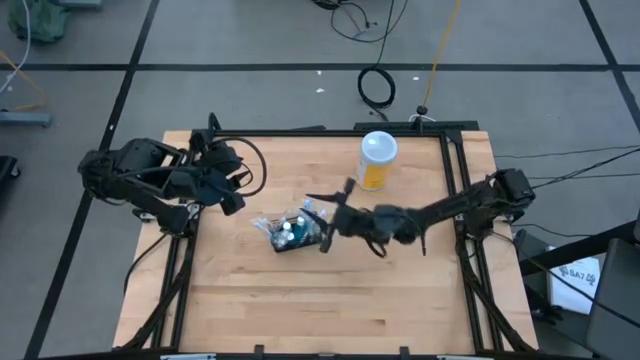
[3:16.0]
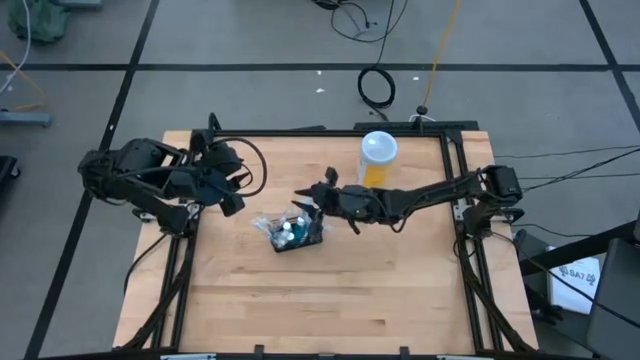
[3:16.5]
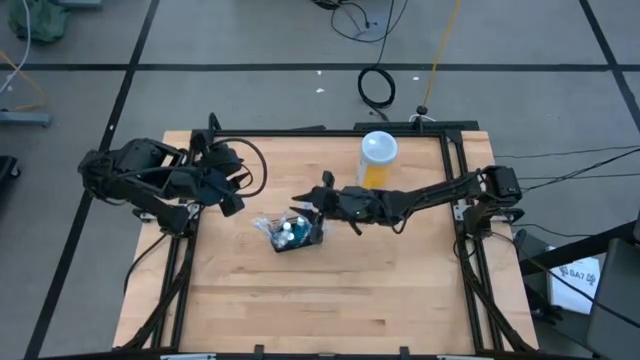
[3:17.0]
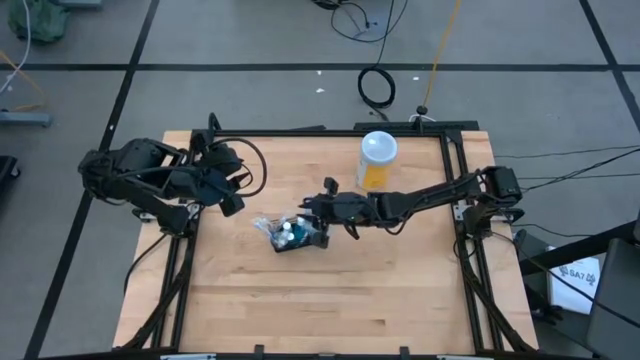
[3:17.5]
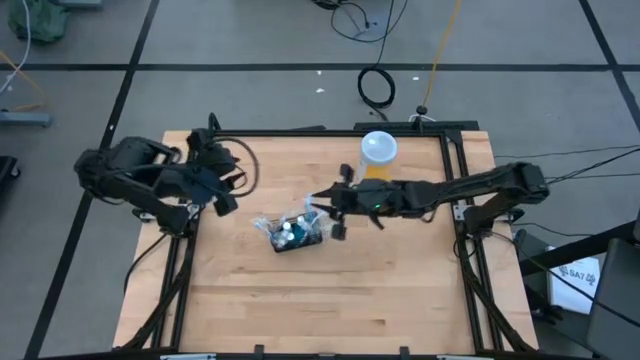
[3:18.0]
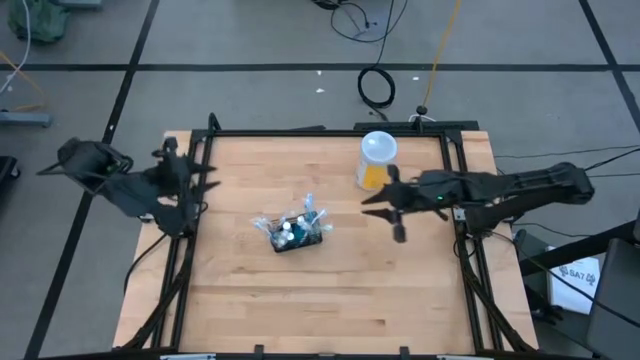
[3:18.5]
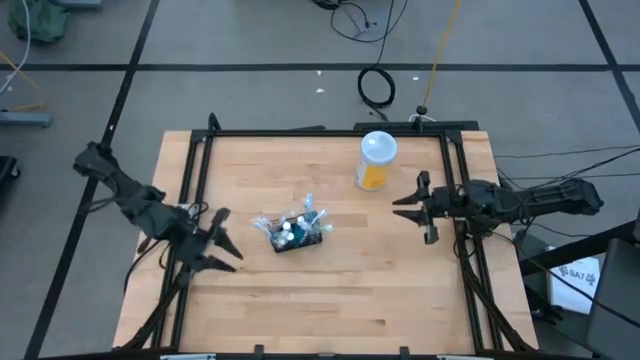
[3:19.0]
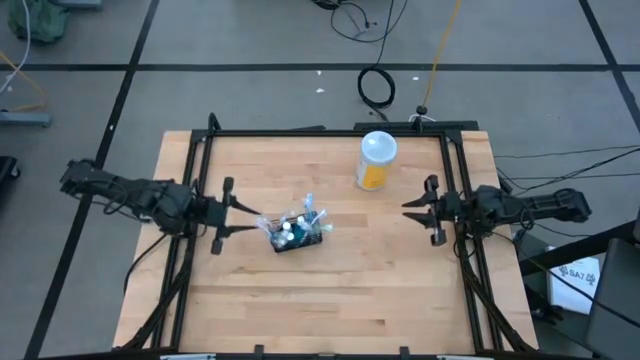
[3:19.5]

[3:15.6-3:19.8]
Task: Pick & Place toothbrushing station
Return to Home Position

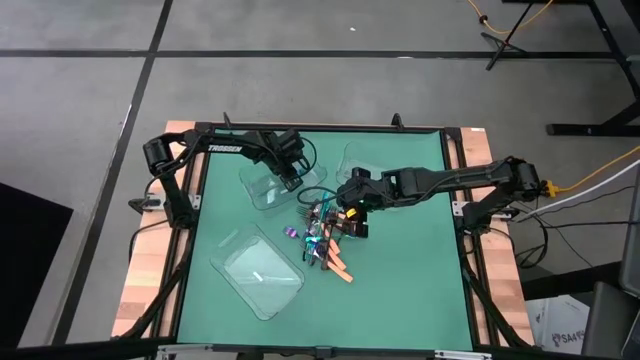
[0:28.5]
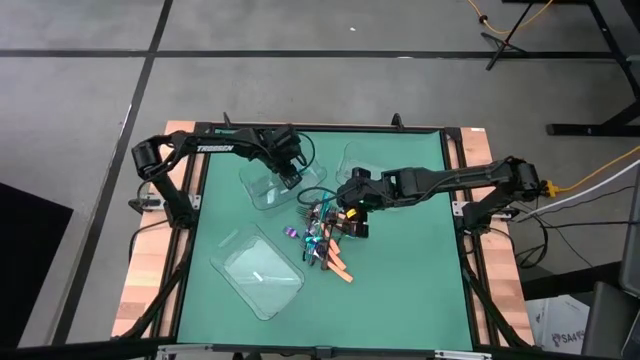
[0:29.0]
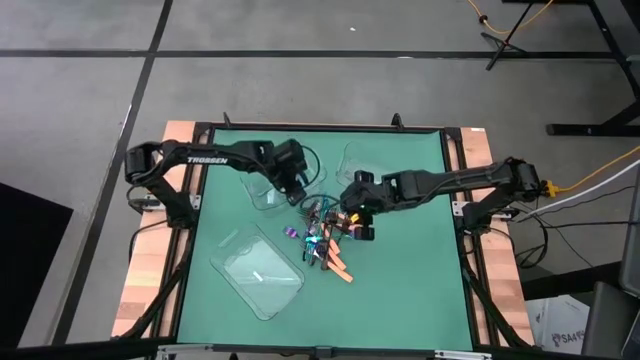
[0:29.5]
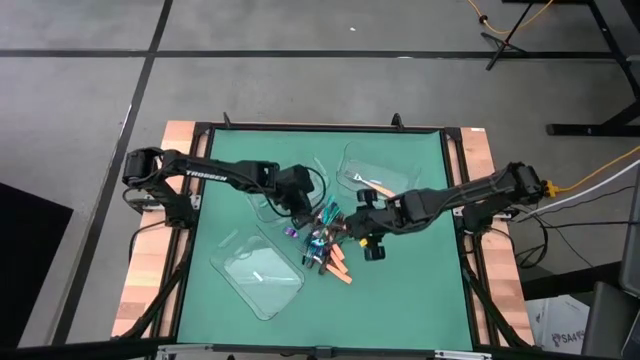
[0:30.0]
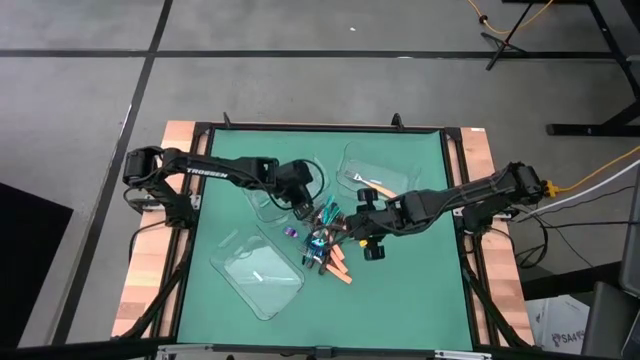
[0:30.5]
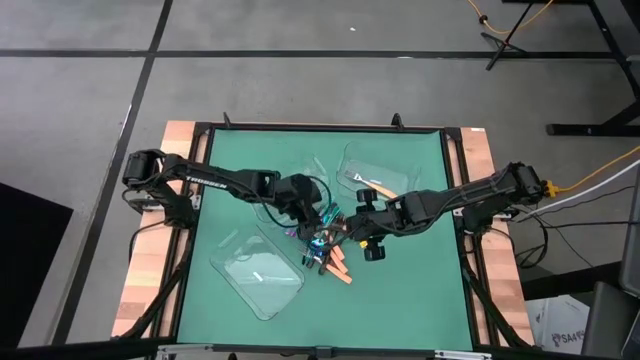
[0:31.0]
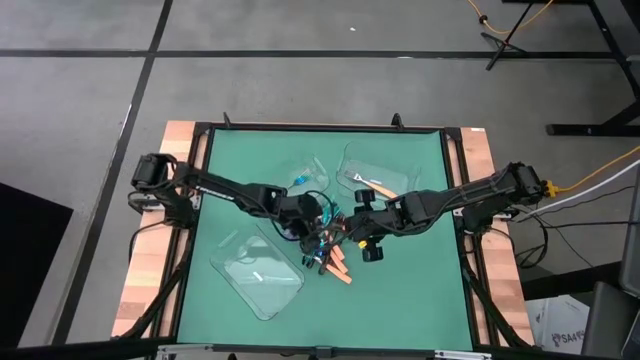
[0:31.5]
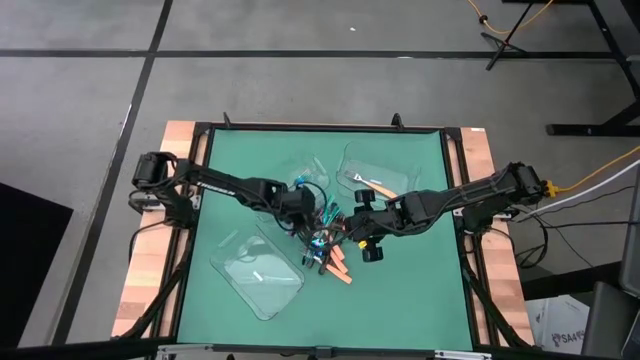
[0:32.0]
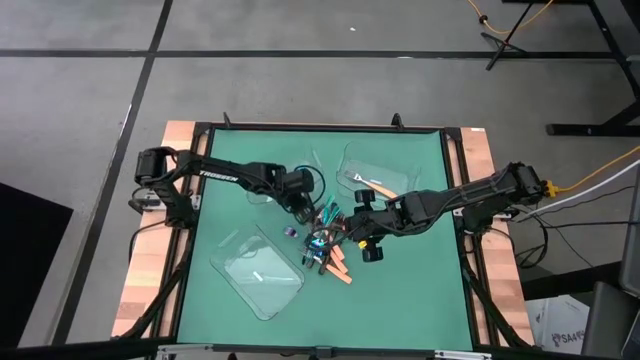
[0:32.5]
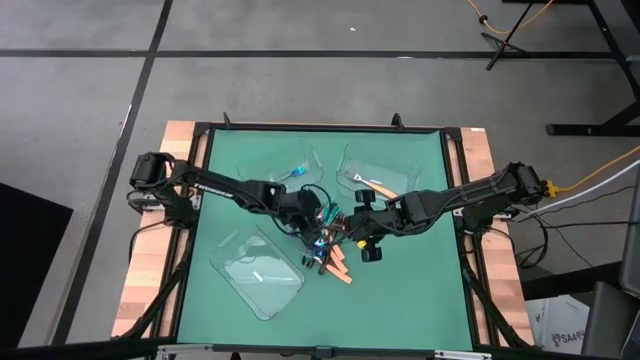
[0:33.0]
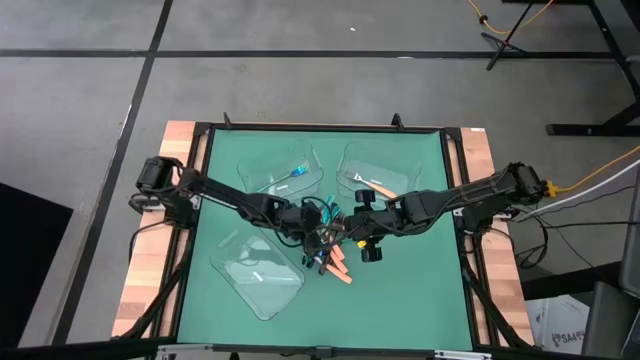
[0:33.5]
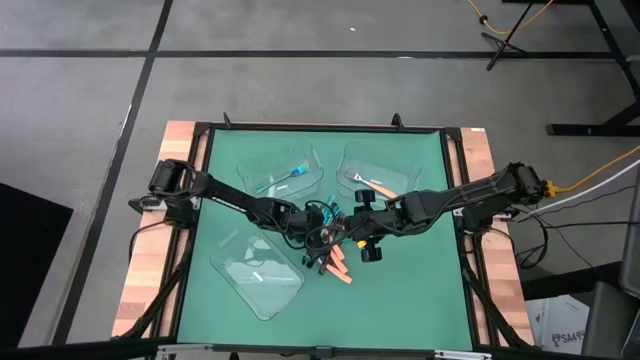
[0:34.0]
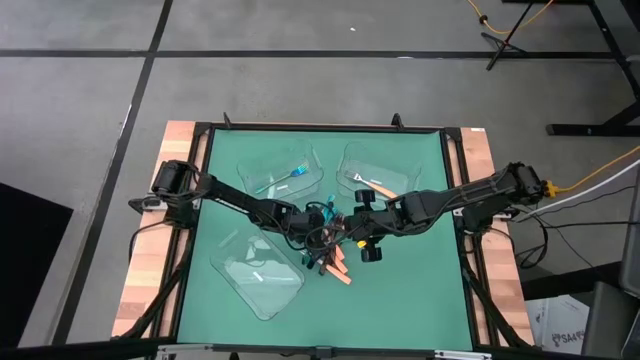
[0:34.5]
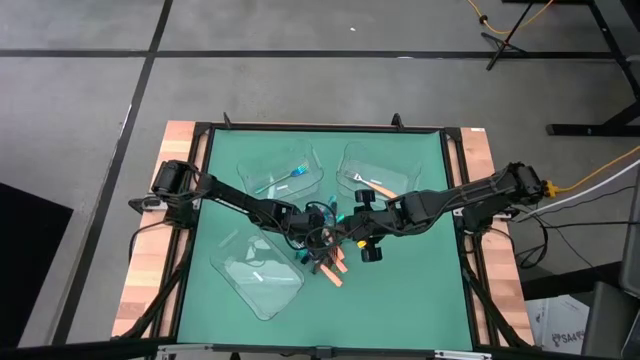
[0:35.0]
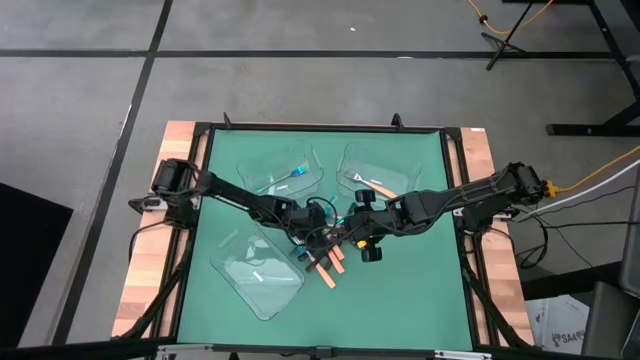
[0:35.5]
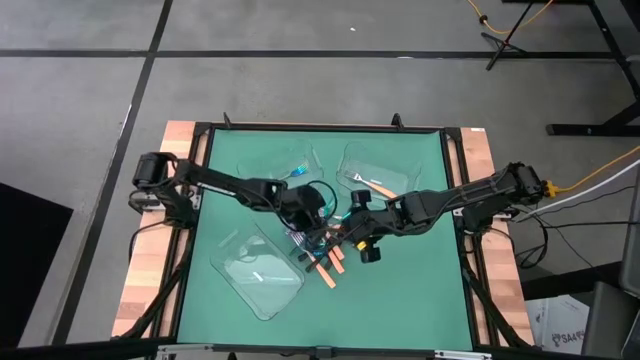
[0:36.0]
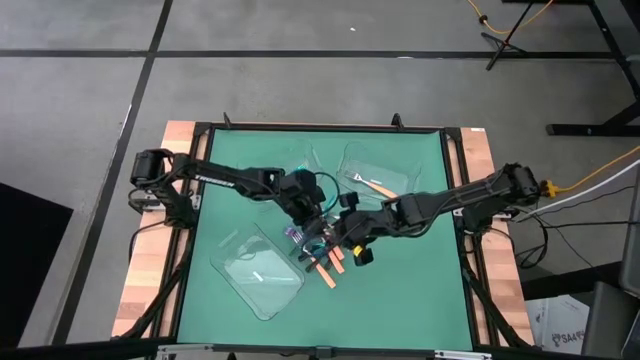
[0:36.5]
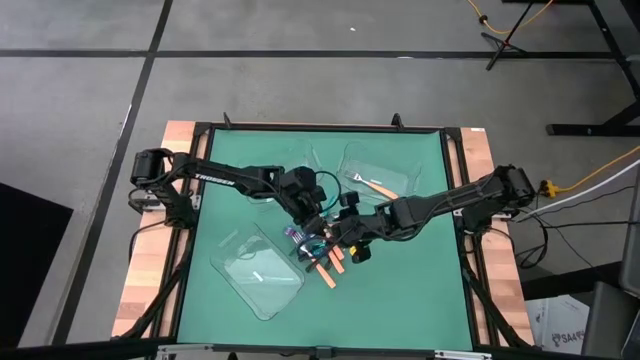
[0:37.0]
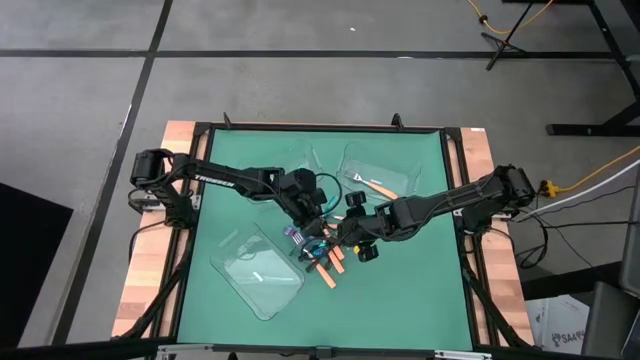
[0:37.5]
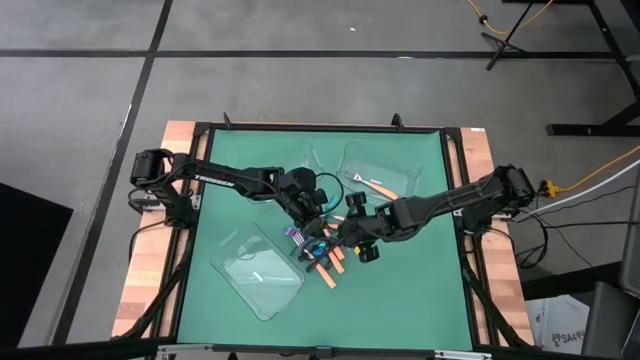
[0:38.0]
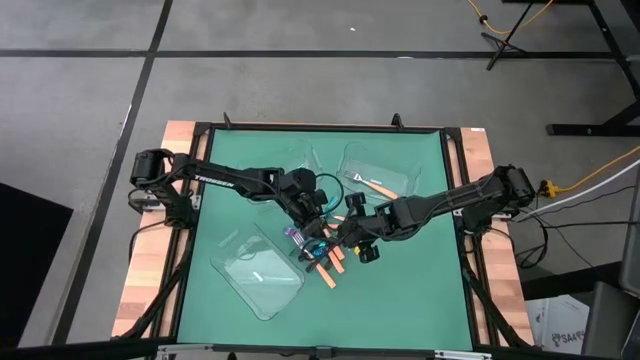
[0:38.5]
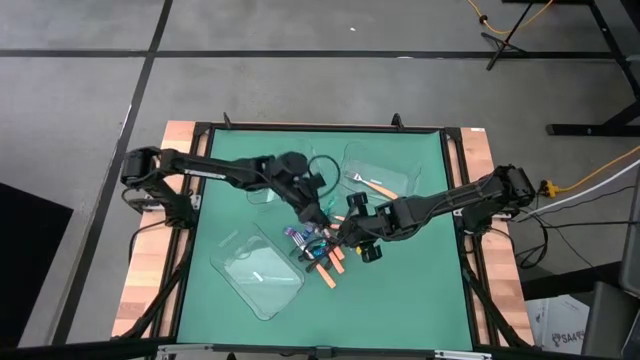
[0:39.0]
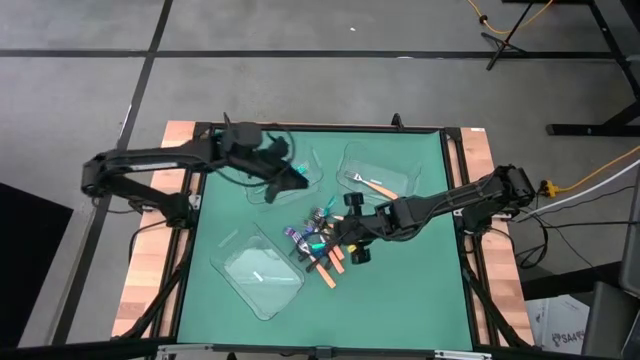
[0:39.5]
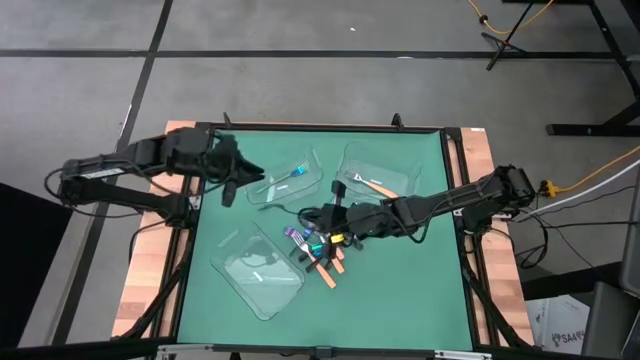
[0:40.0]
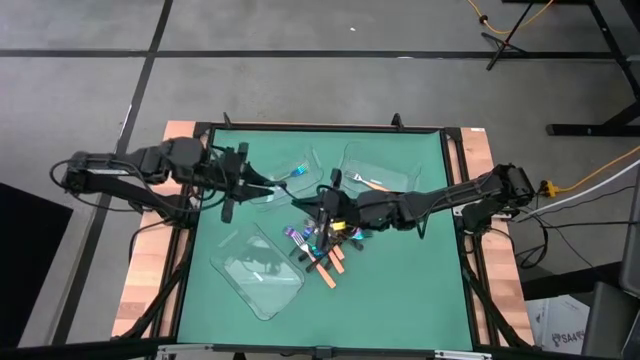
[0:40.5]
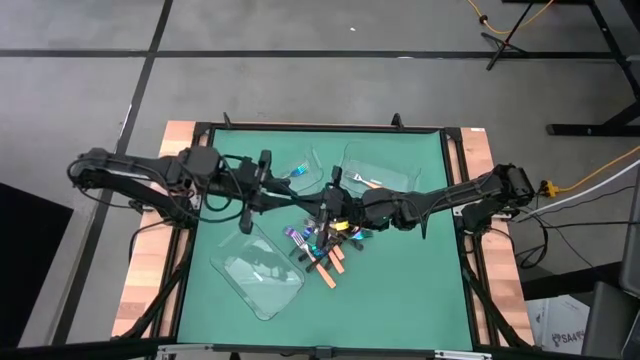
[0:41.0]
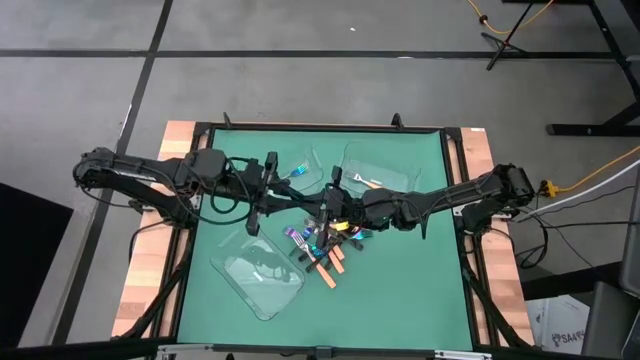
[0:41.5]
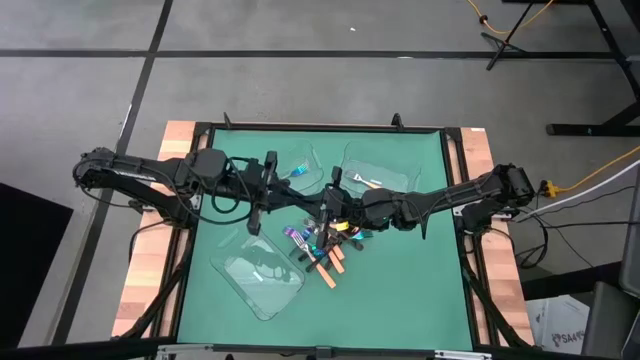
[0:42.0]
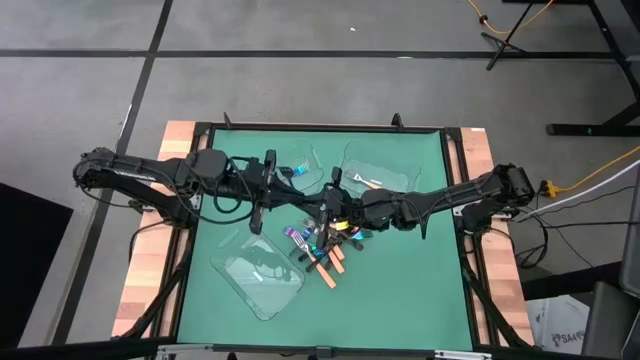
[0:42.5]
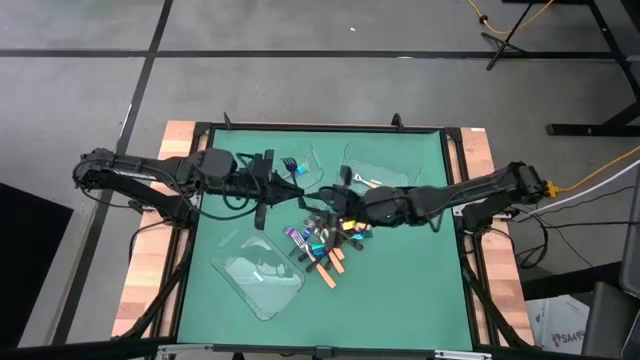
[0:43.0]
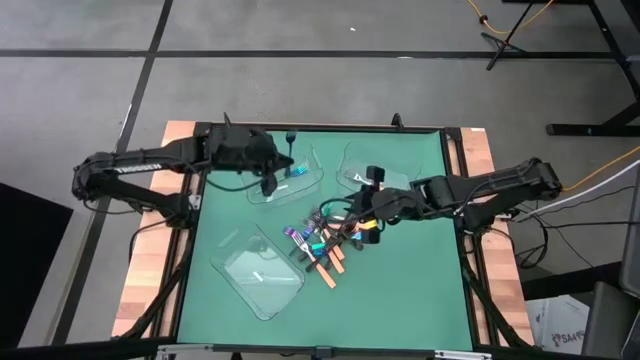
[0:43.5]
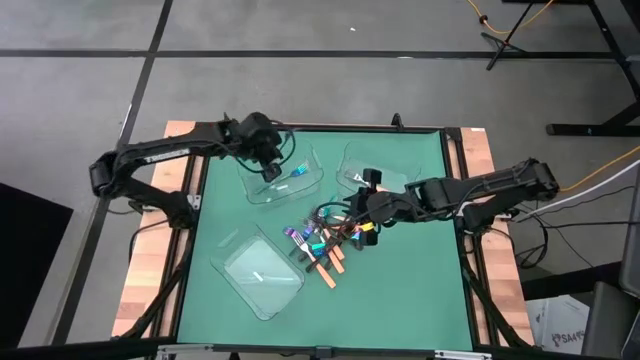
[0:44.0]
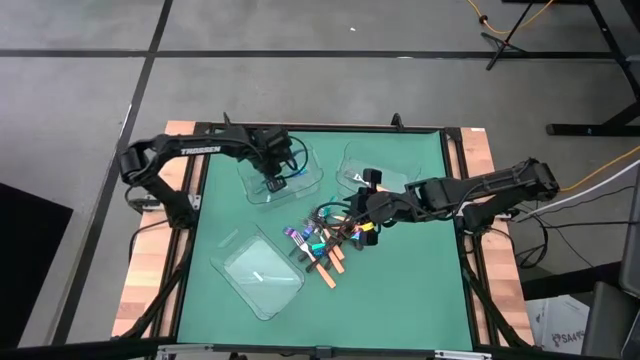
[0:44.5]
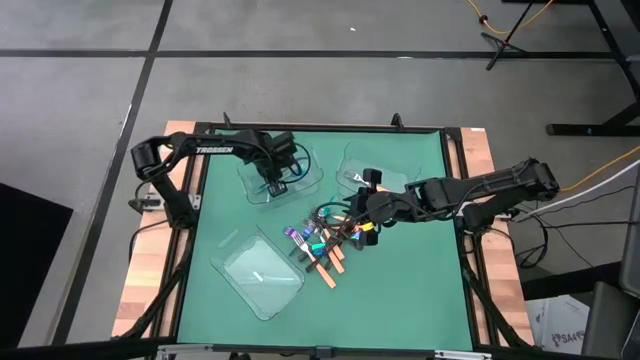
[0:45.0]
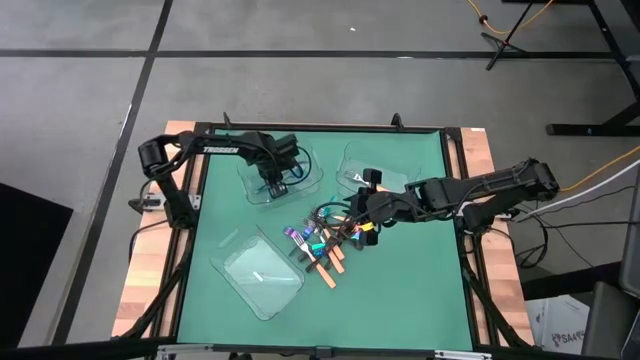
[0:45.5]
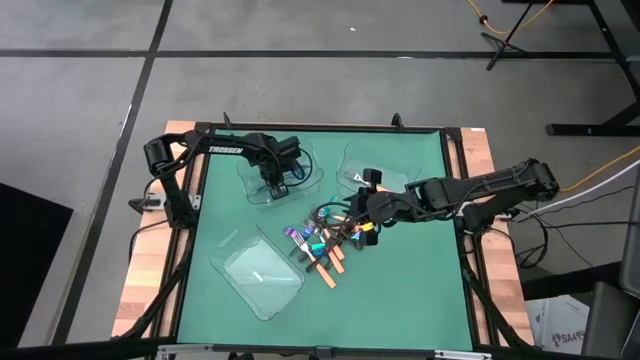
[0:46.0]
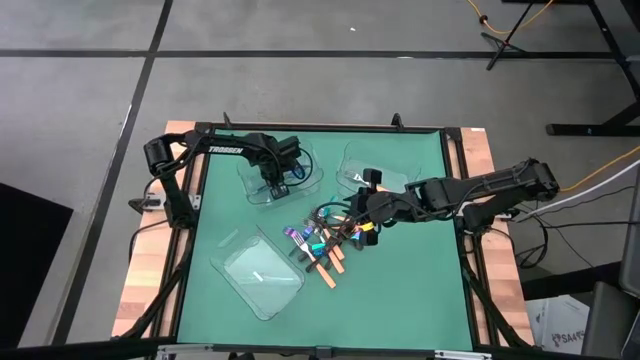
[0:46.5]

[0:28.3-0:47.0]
Task: Sort silverware by color (type)
Put the blue fork into the top left transparent bin
